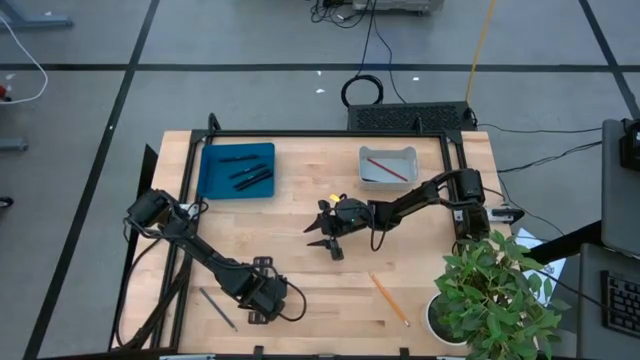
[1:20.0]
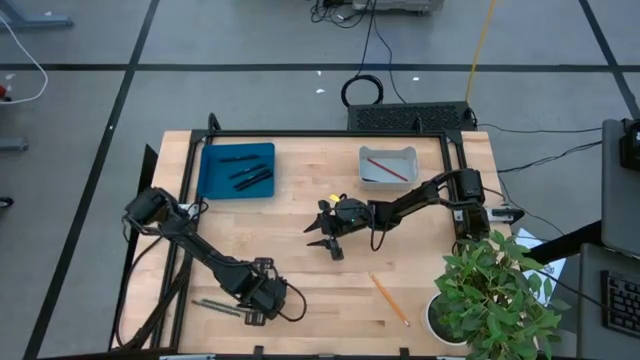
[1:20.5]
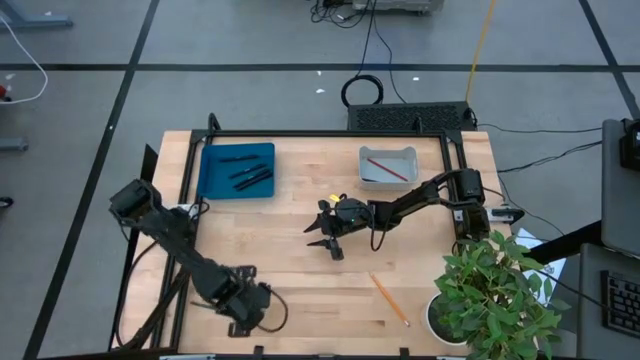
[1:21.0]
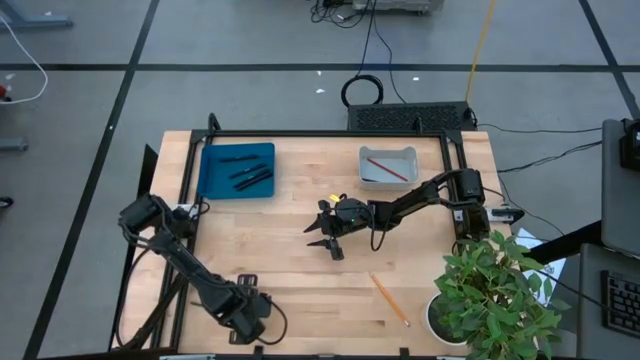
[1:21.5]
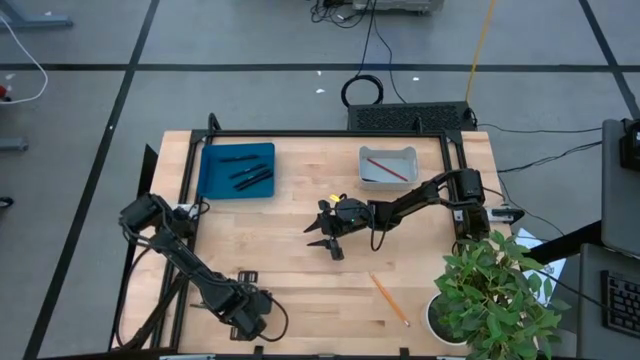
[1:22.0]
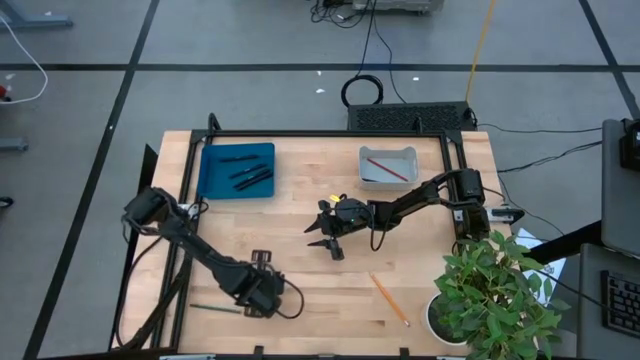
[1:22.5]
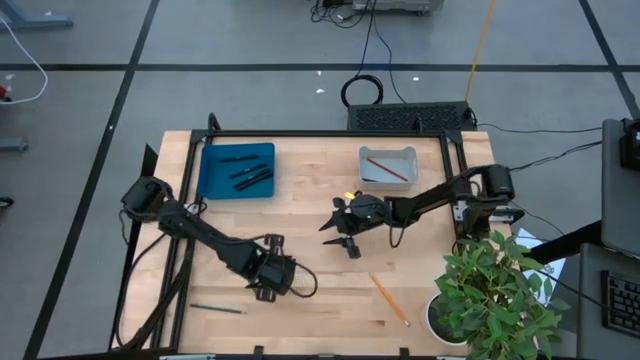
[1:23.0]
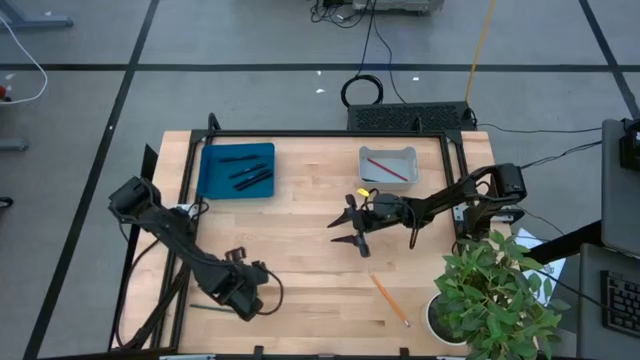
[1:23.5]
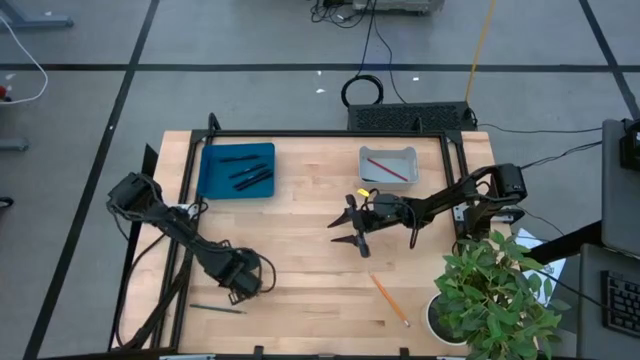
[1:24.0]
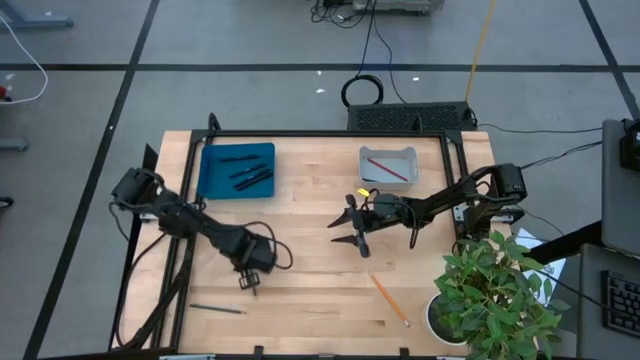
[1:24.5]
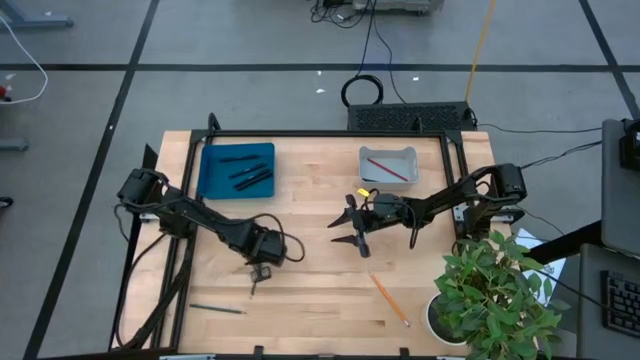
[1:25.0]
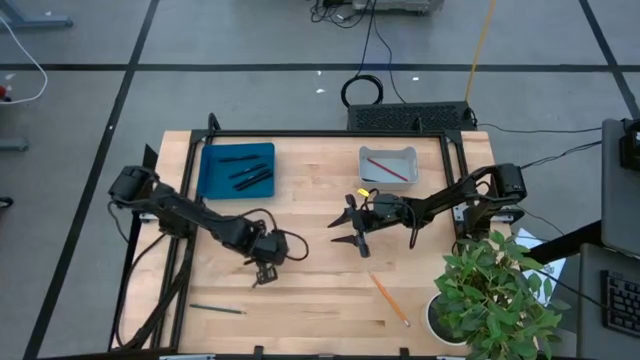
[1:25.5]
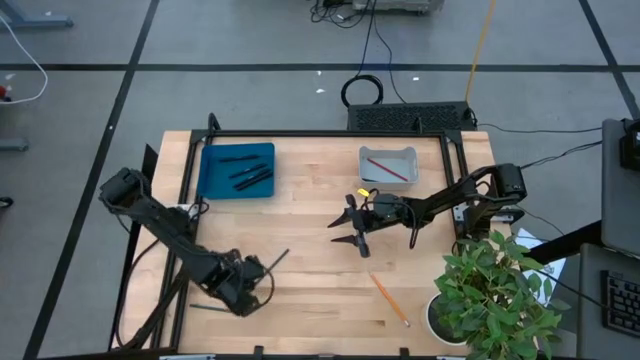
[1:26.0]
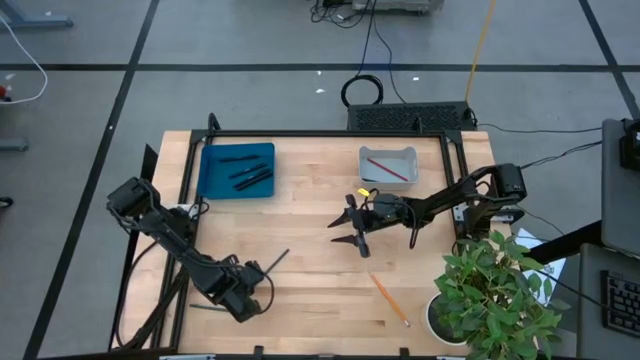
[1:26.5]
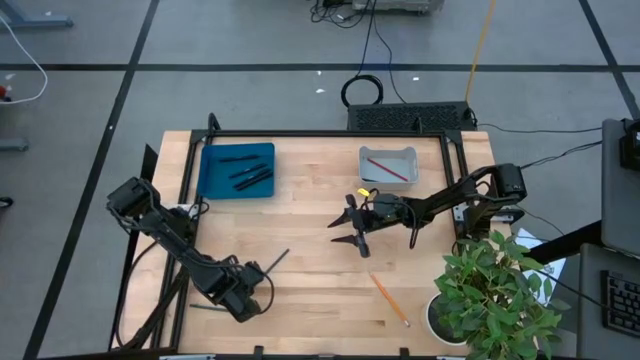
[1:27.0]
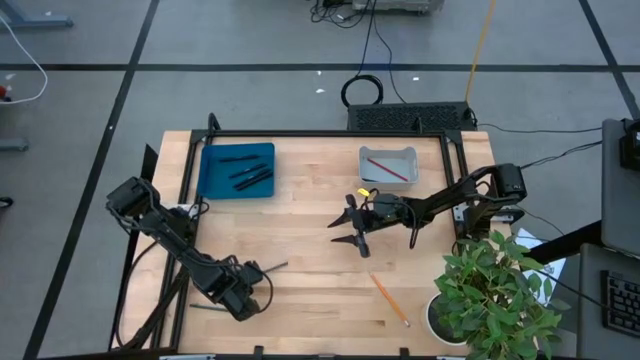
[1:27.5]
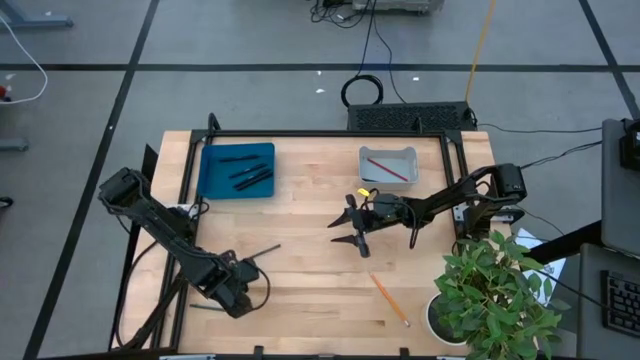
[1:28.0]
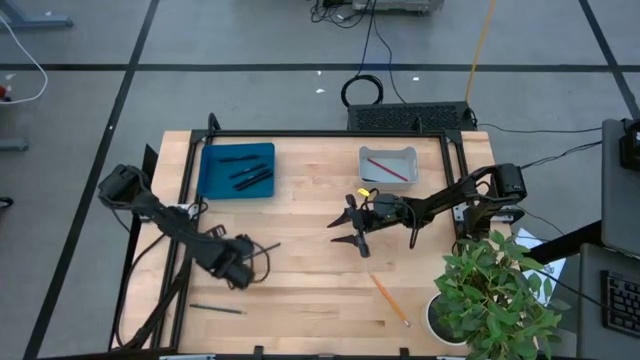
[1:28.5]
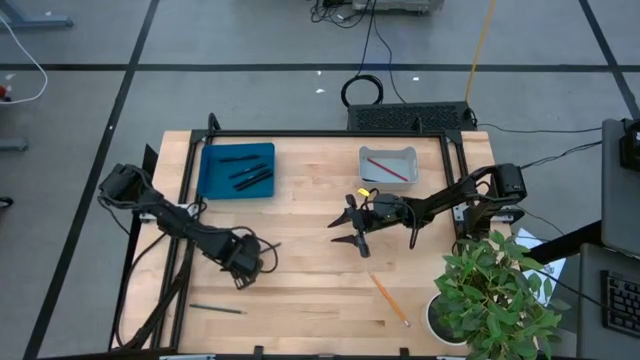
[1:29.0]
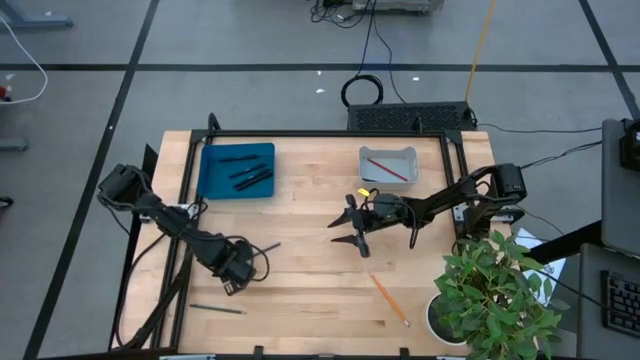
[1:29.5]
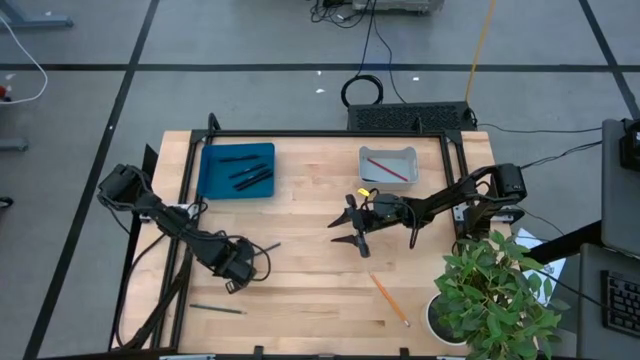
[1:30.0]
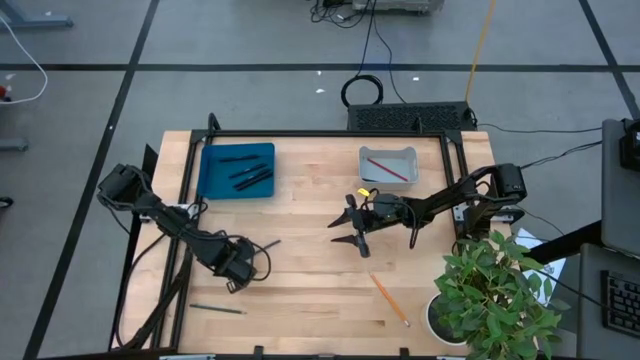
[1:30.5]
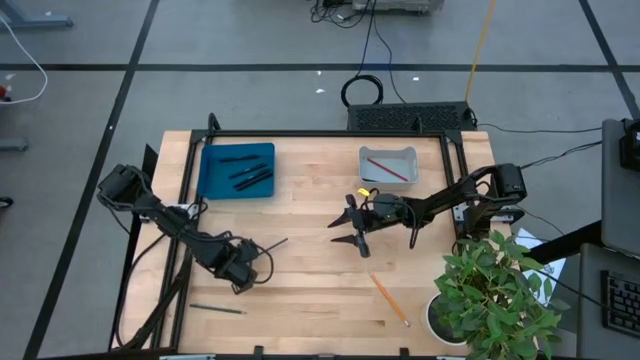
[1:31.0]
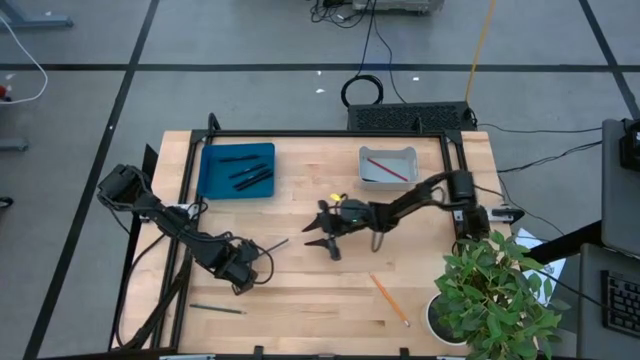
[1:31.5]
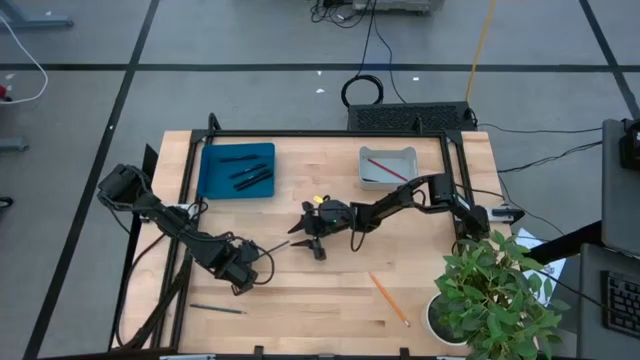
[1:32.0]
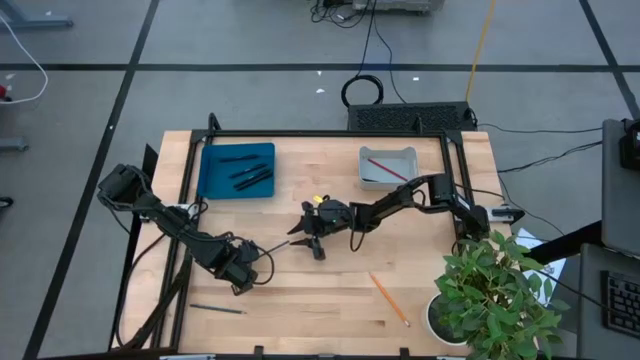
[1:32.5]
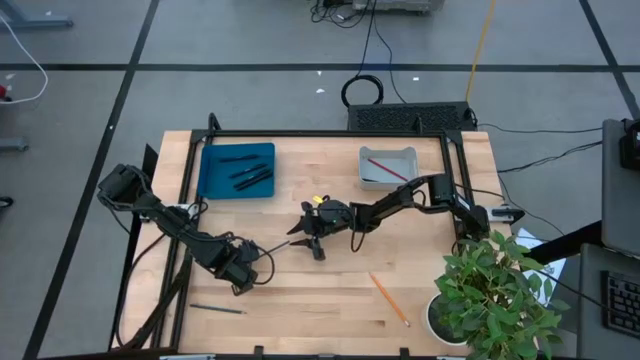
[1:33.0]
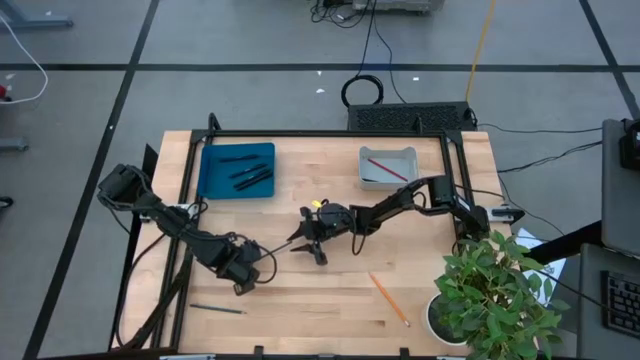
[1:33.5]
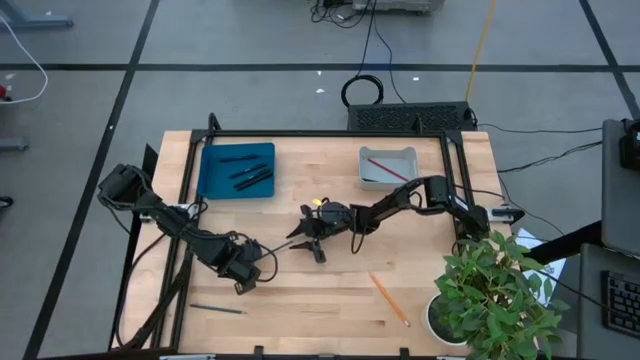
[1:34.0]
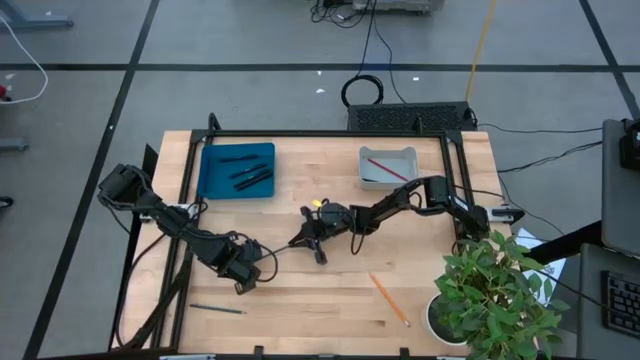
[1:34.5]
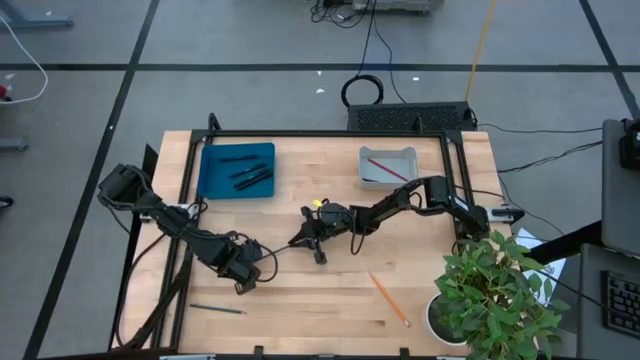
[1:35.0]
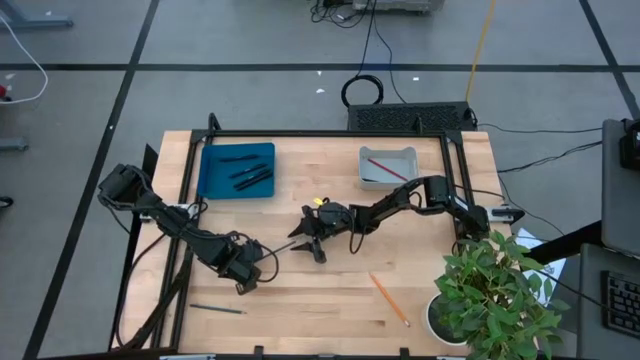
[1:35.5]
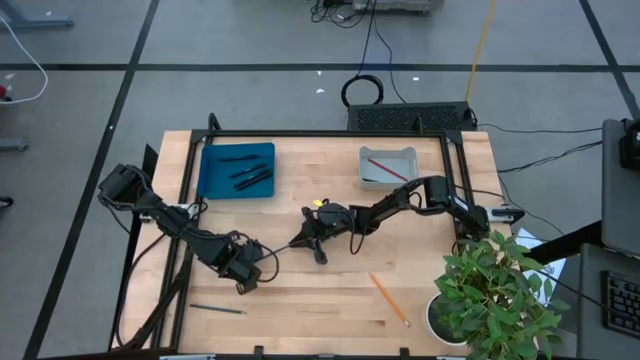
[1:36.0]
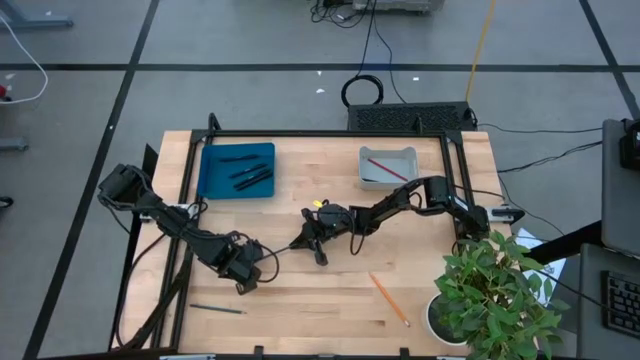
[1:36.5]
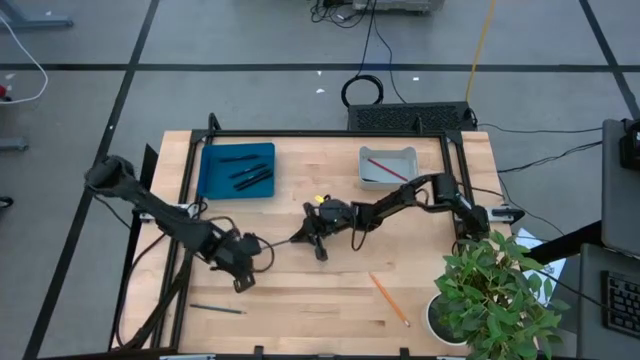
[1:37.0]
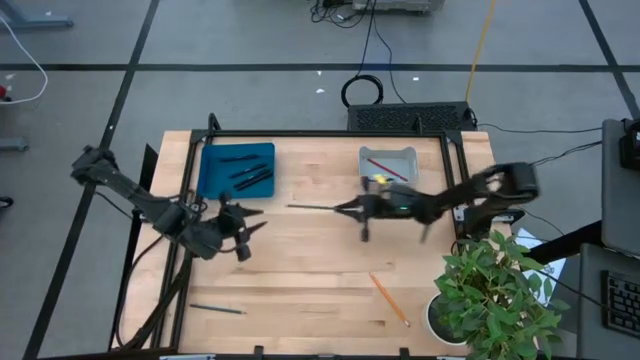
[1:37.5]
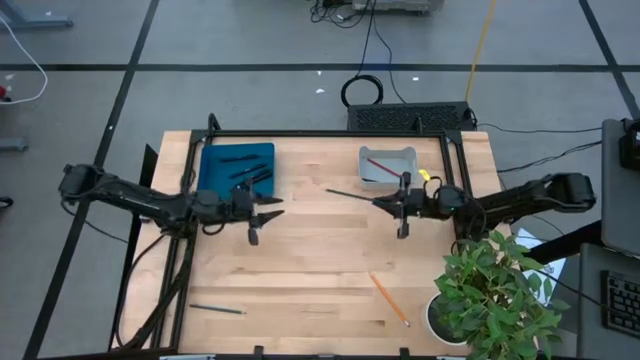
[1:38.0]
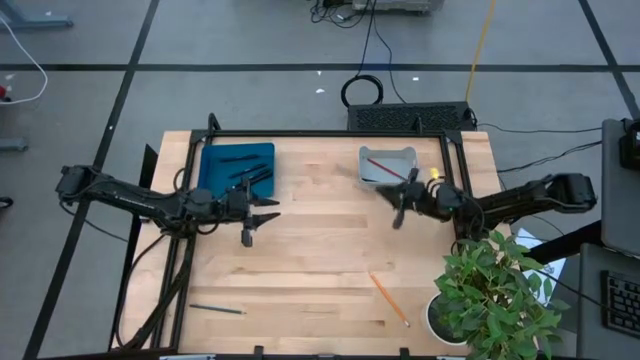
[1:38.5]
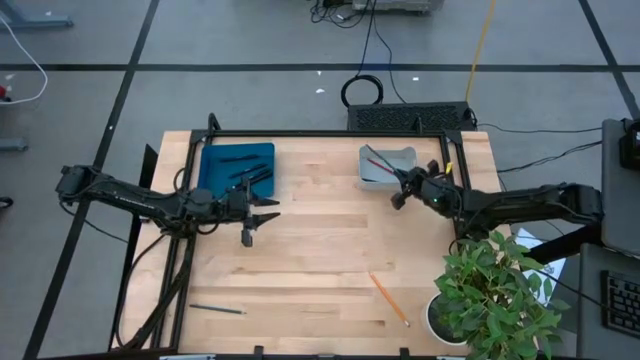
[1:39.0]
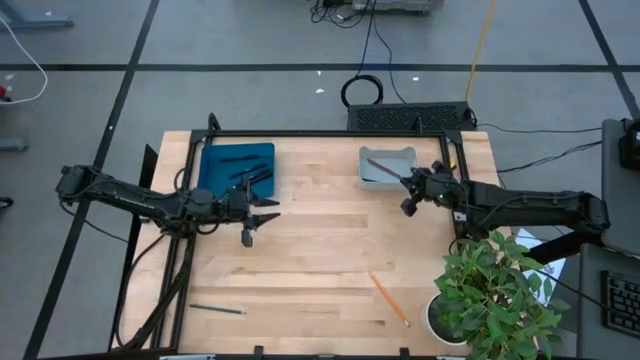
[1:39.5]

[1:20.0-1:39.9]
Task: Sort pens & pencils
Put the green pencil into the gray bin

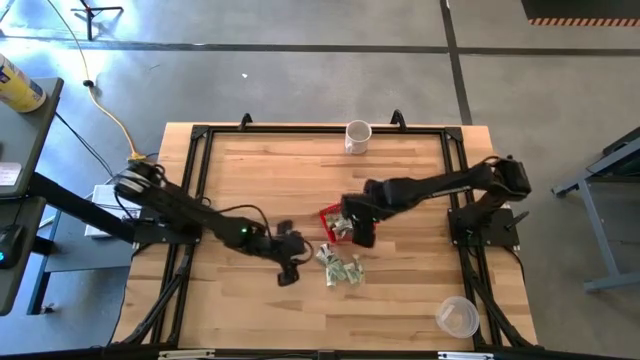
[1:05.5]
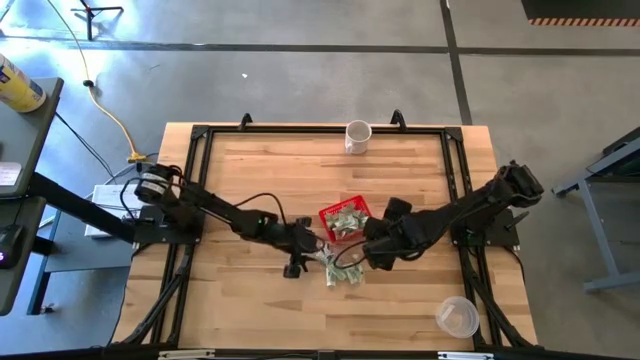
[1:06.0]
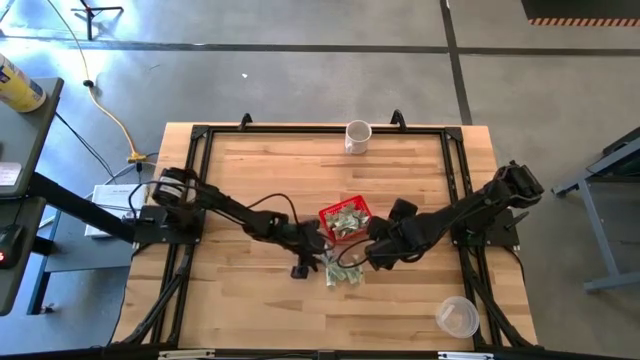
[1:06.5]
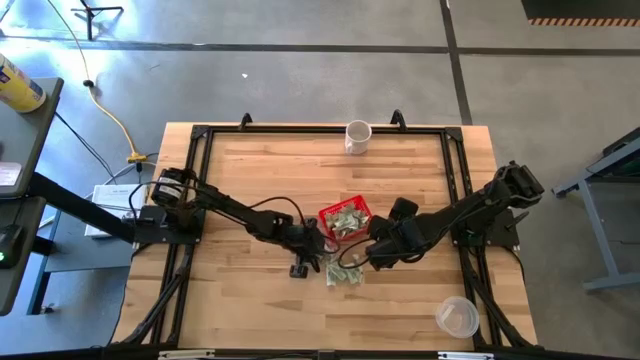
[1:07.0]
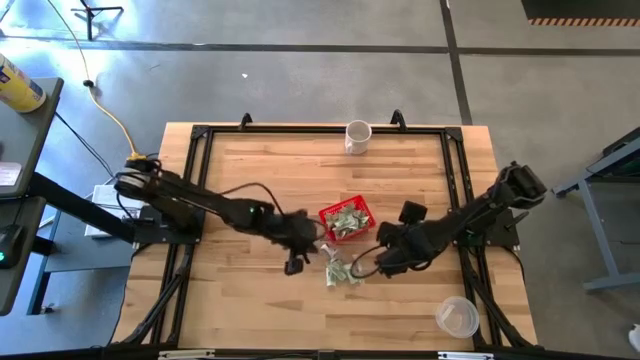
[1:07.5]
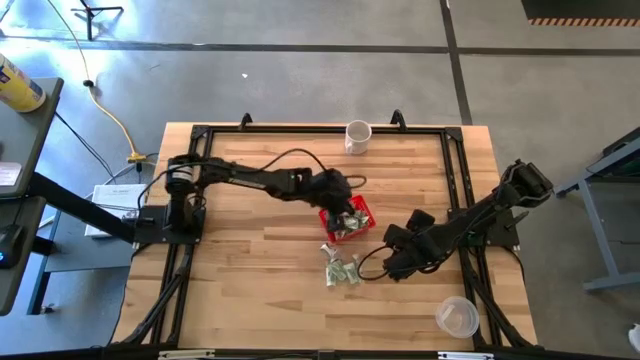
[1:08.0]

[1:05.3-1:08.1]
Task: Pick and place items into bin
Put the green truvia packet into the red bin
